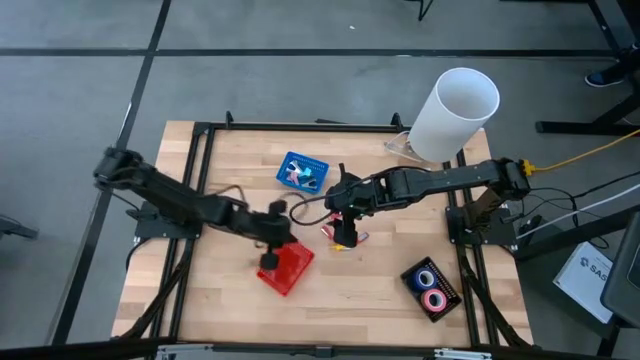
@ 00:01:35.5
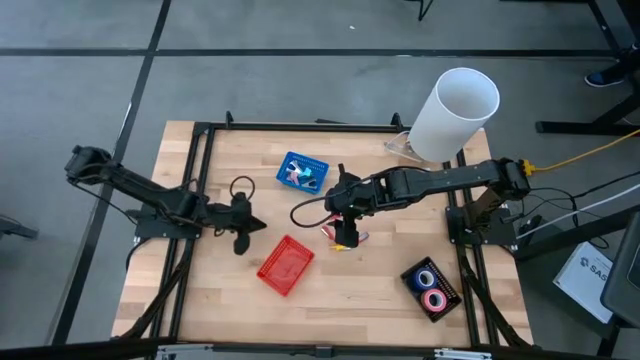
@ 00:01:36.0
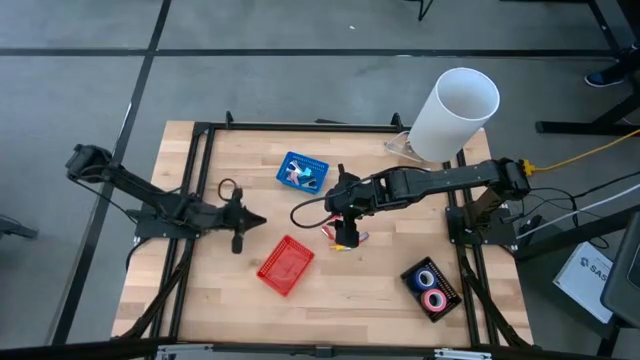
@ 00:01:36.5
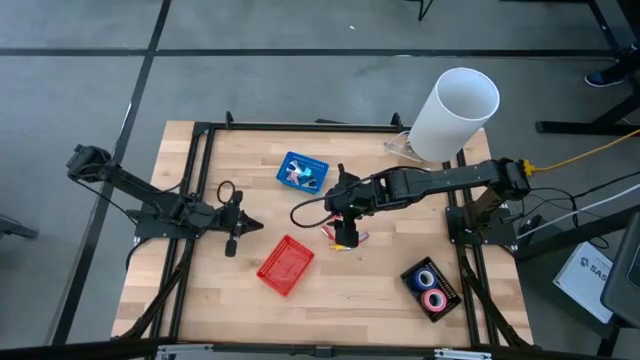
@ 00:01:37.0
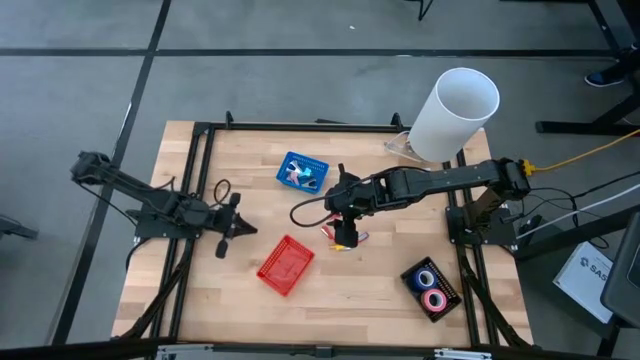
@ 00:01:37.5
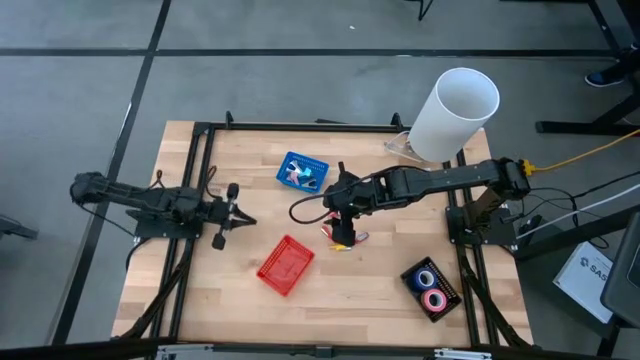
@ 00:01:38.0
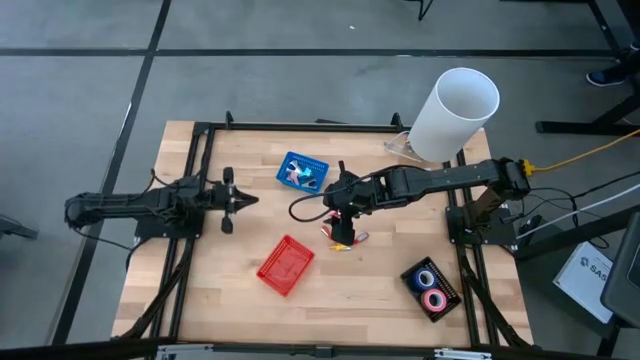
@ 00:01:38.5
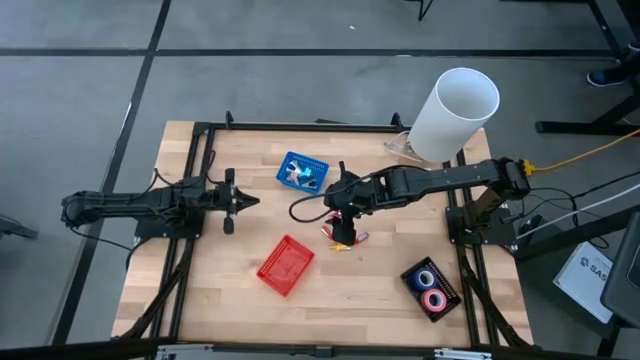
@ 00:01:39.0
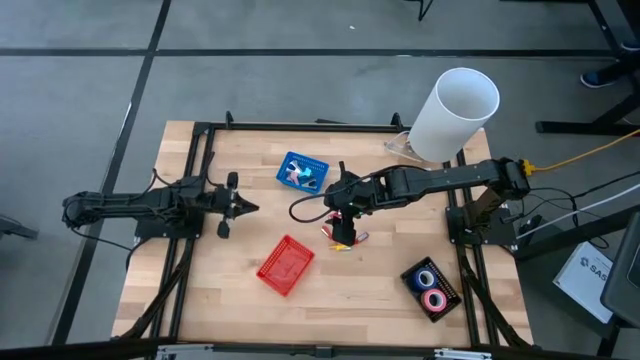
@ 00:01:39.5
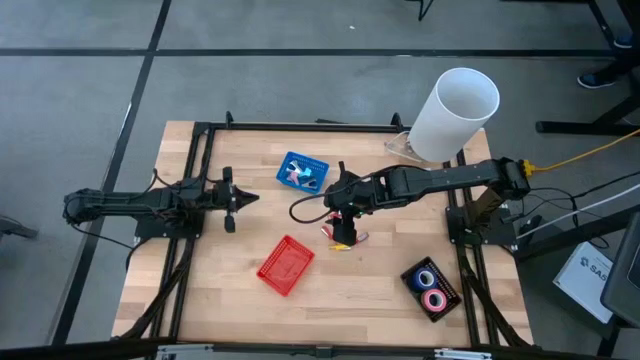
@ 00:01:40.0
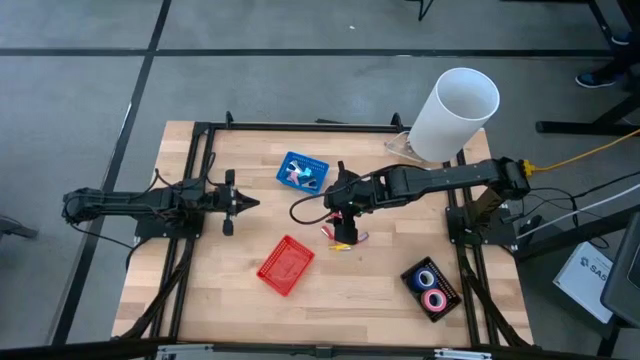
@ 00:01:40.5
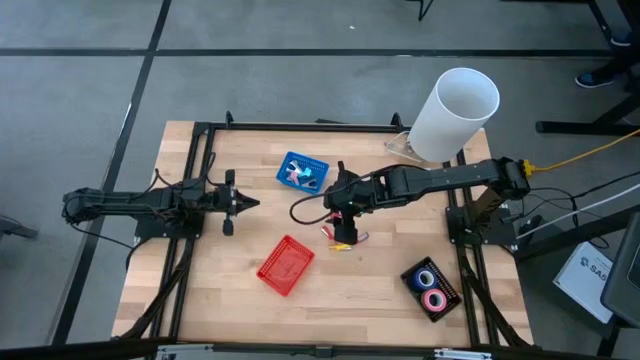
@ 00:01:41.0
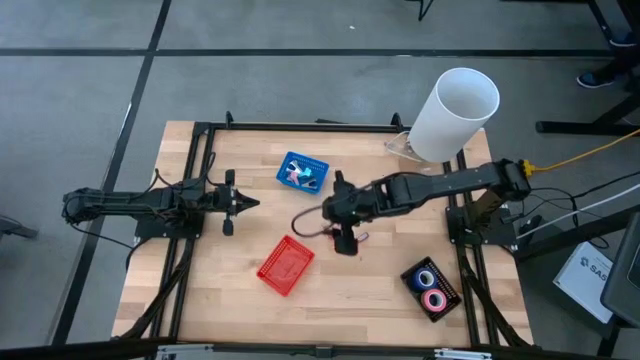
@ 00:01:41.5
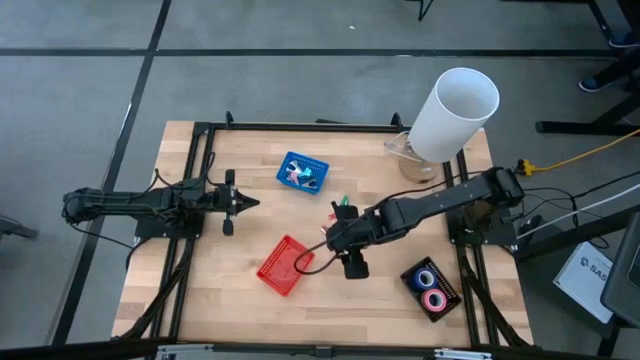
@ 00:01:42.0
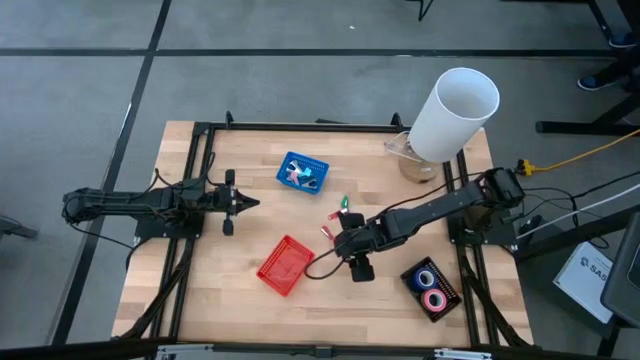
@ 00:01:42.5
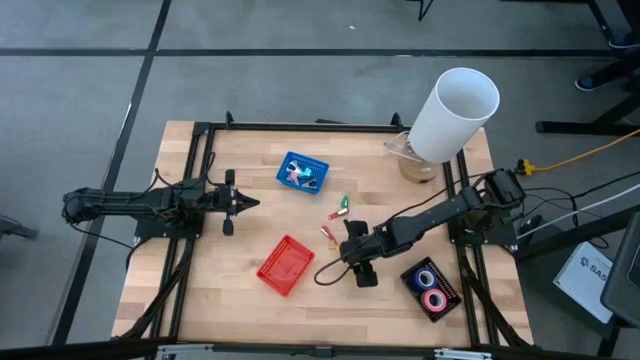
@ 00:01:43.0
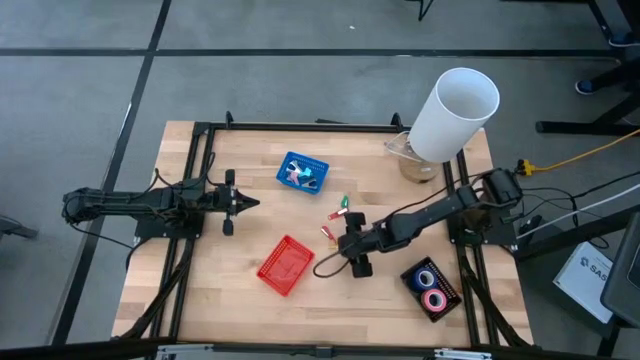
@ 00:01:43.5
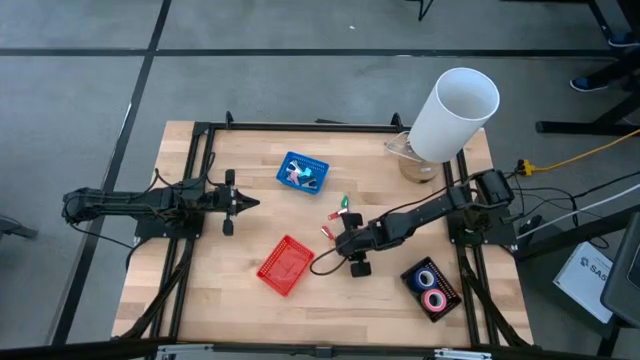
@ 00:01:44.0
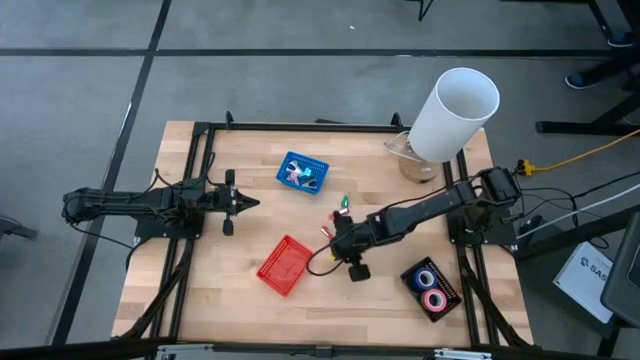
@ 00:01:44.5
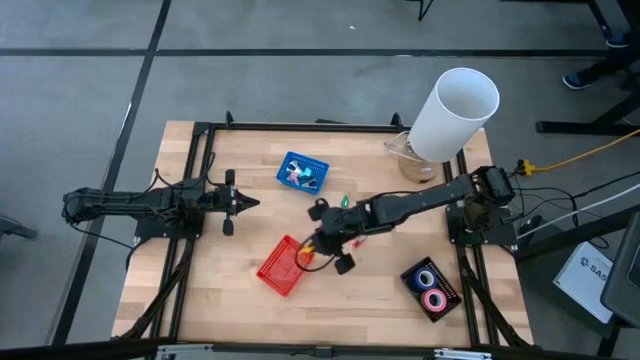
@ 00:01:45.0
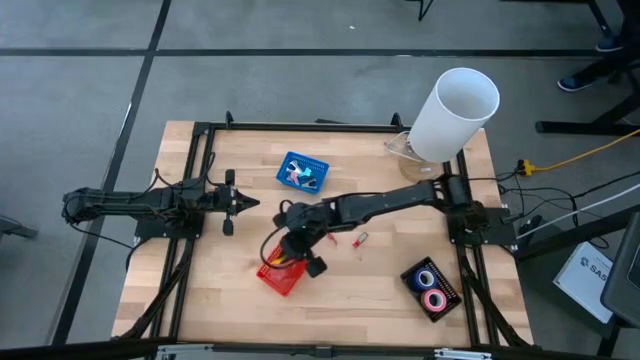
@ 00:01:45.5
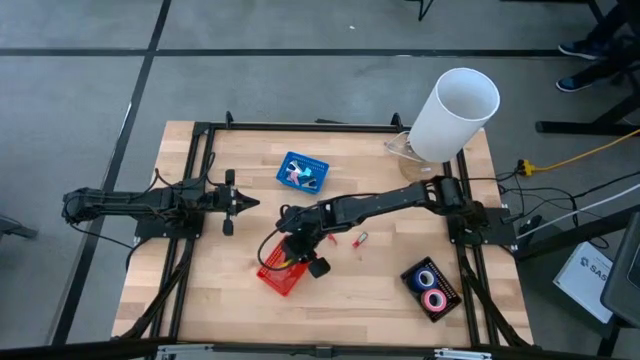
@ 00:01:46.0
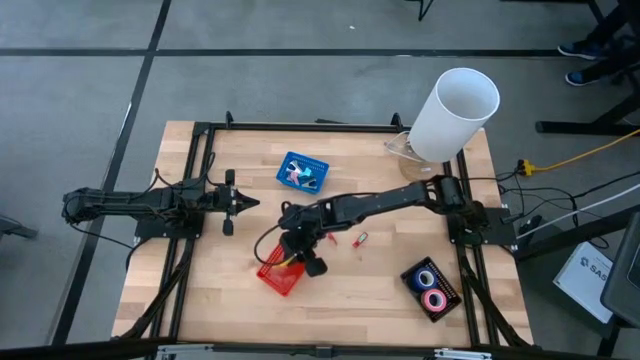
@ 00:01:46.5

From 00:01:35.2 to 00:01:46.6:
Task: Pick and place Stapler, Stapler remover, tape
Put the yellow stapler into the red bin

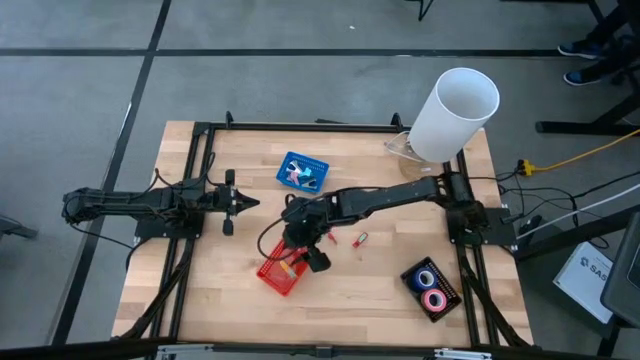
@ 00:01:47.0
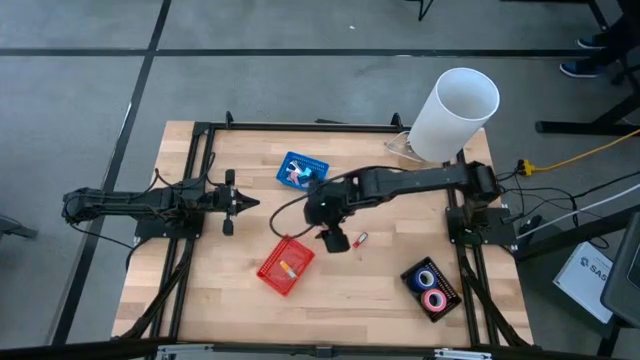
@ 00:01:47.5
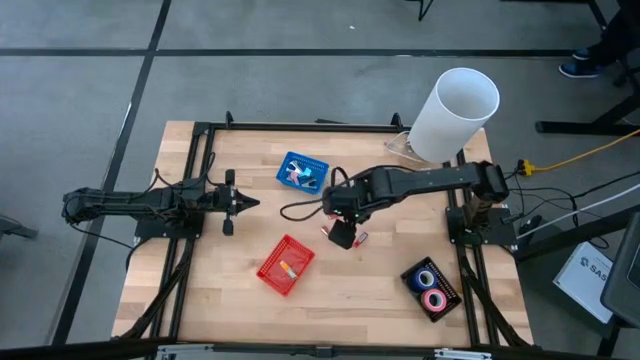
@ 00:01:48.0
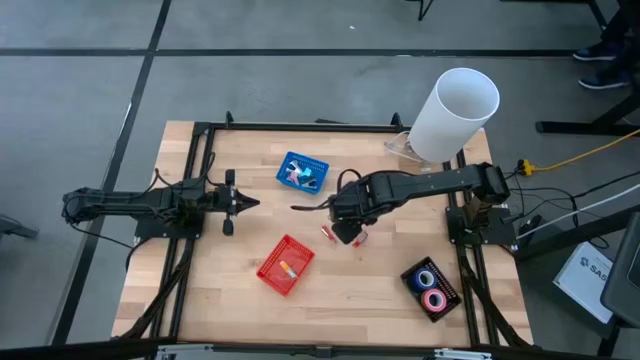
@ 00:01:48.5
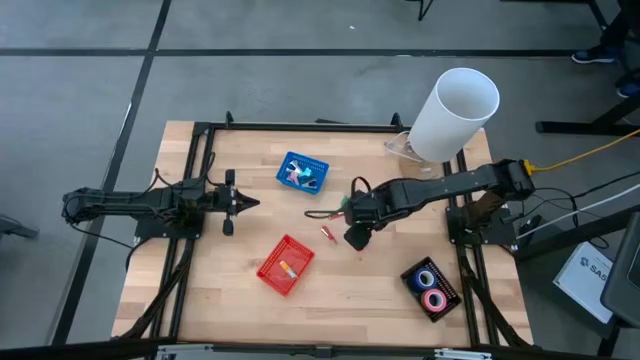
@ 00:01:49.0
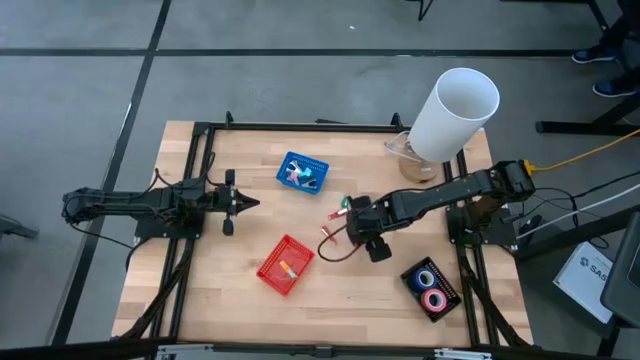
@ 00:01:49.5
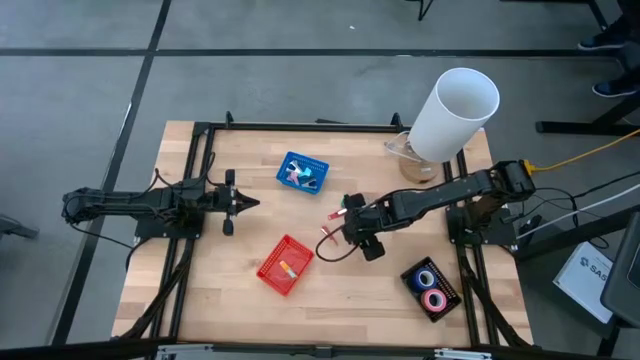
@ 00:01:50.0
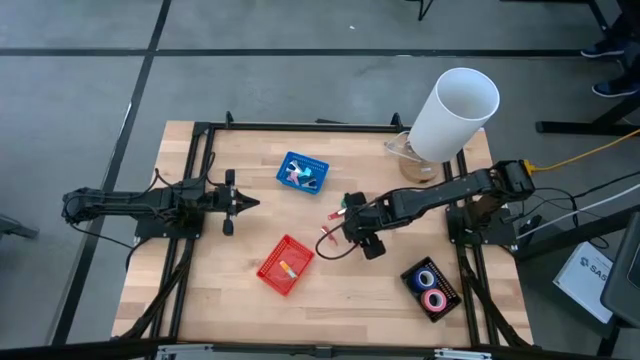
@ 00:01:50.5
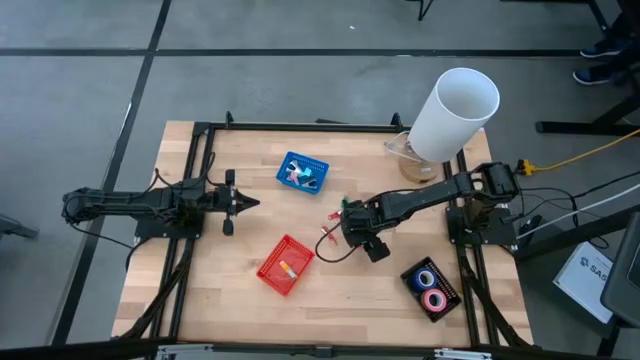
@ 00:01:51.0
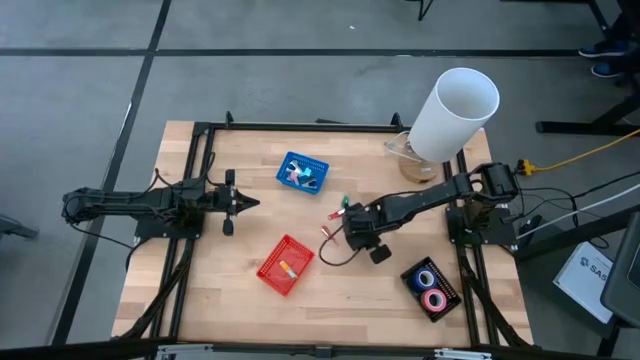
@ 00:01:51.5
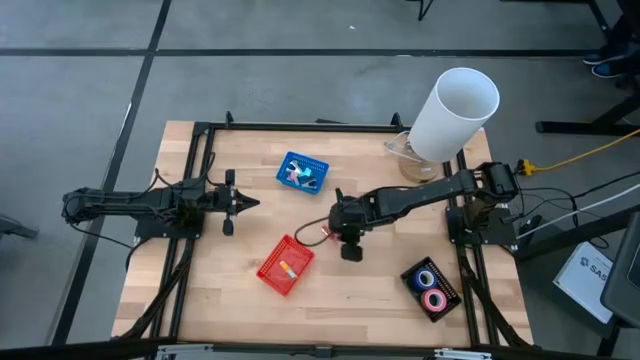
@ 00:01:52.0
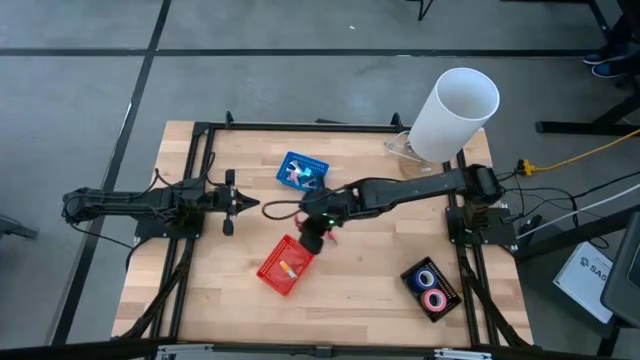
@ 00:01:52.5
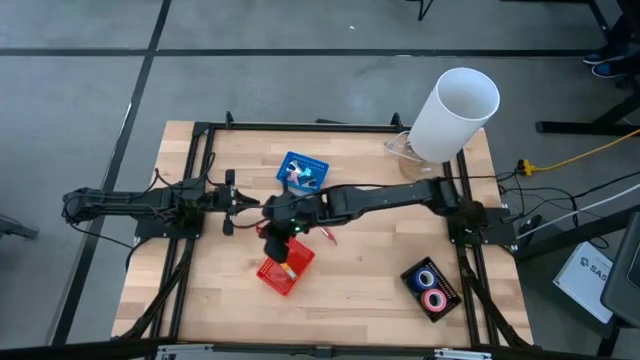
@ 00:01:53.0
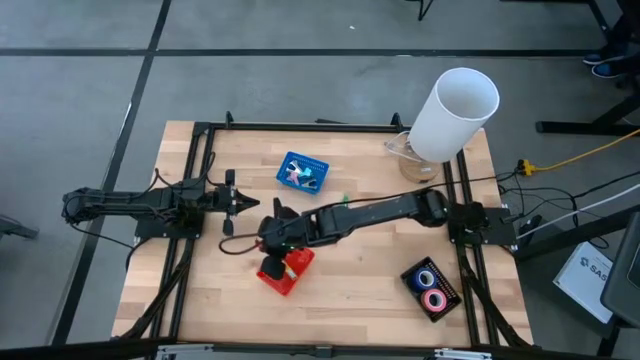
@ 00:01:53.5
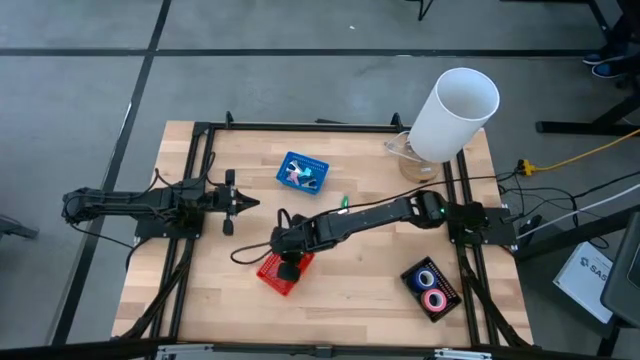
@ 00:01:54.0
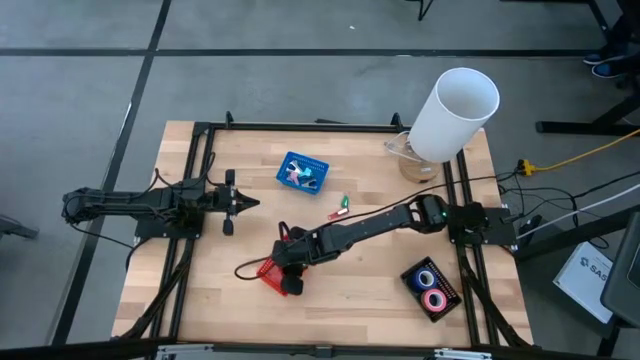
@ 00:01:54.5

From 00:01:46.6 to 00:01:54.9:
Put the red stapler into the red bin

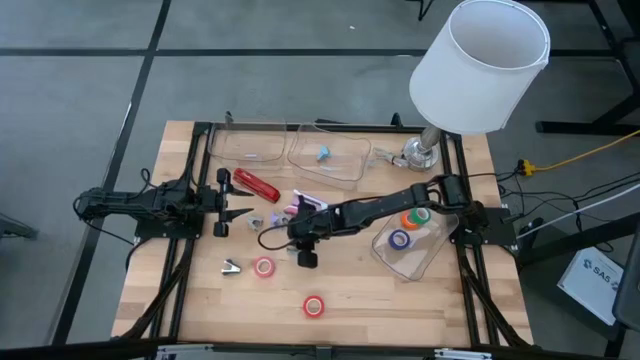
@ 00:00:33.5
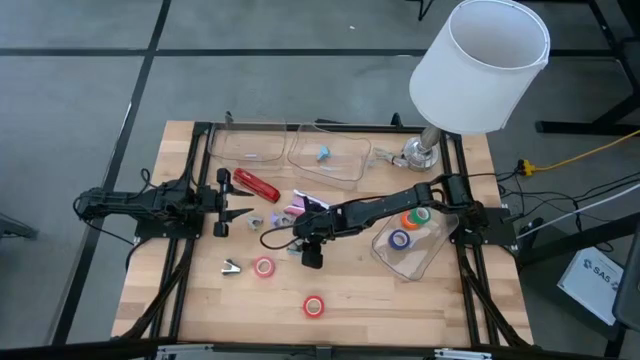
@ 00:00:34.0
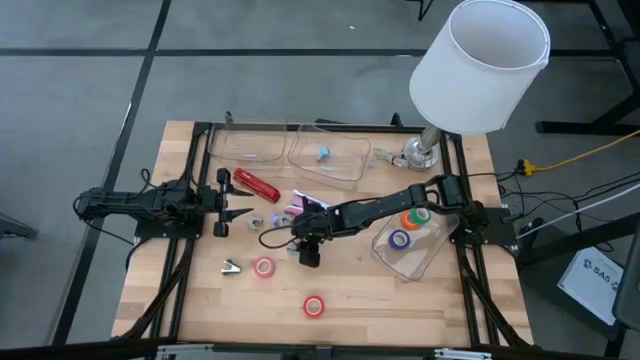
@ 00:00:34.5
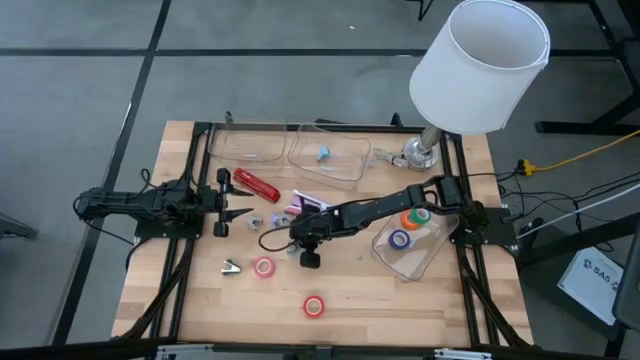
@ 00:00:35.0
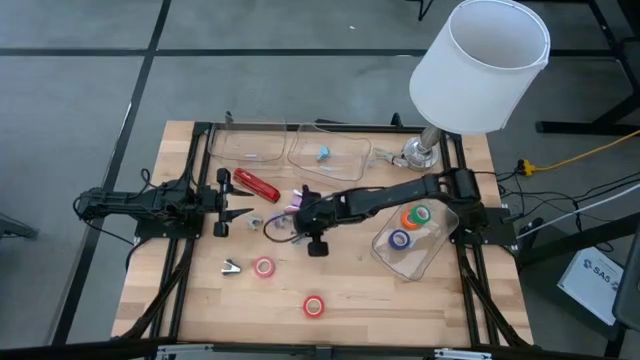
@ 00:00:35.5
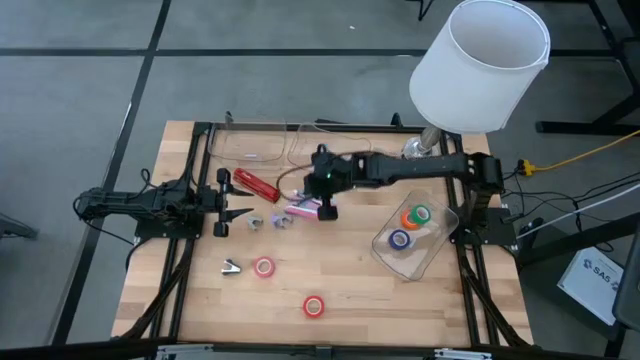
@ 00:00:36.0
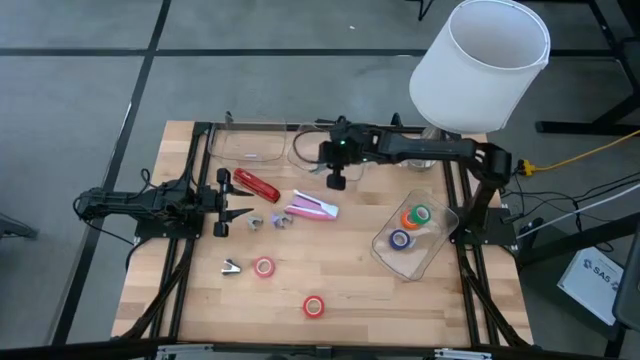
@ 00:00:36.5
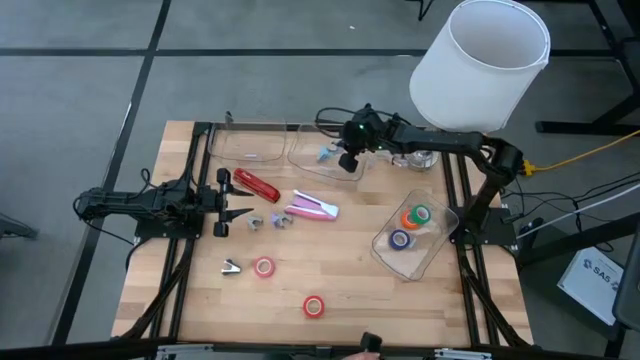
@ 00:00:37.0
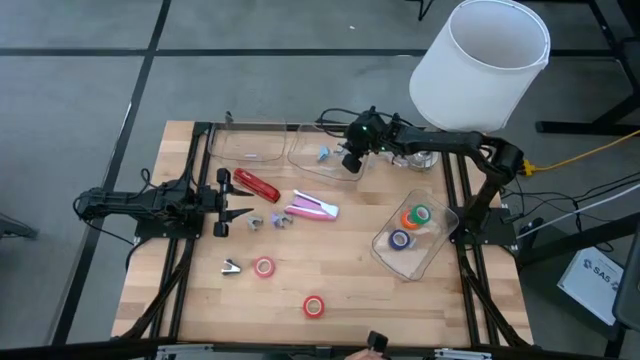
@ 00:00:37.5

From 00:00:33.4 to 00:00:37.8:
Task: Pick and place Stapler, Stapler remover, tape
Put the blue staple remover into the top right transparent bin
